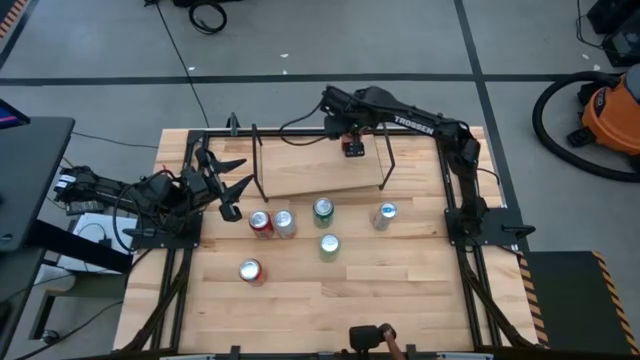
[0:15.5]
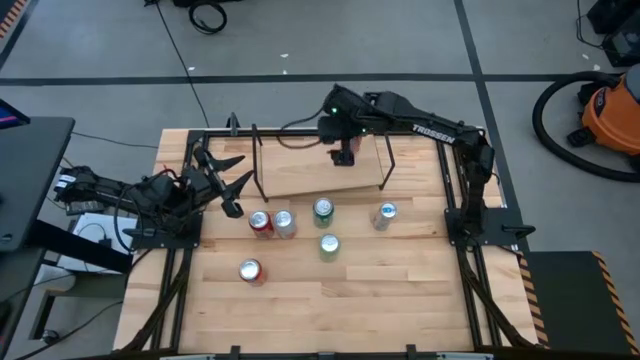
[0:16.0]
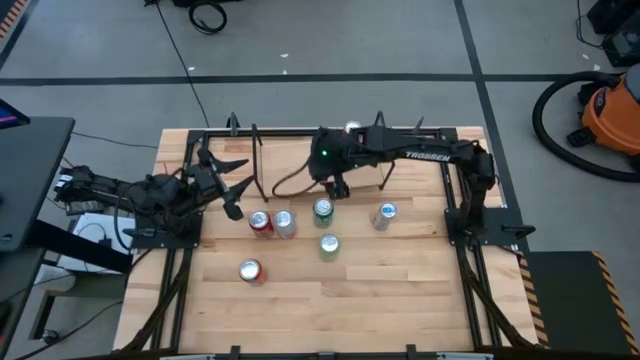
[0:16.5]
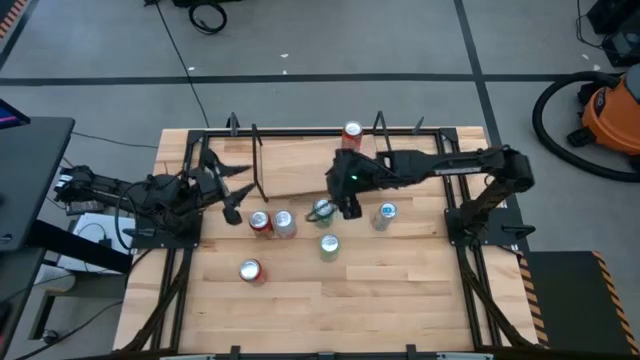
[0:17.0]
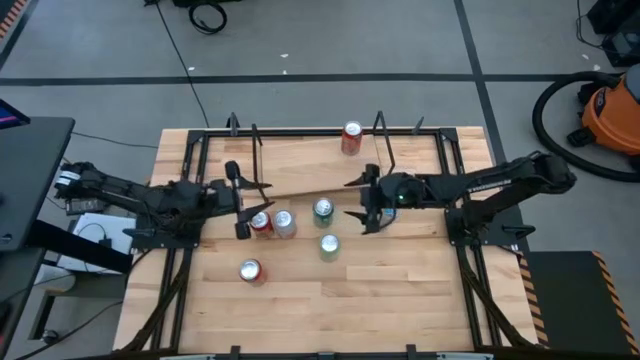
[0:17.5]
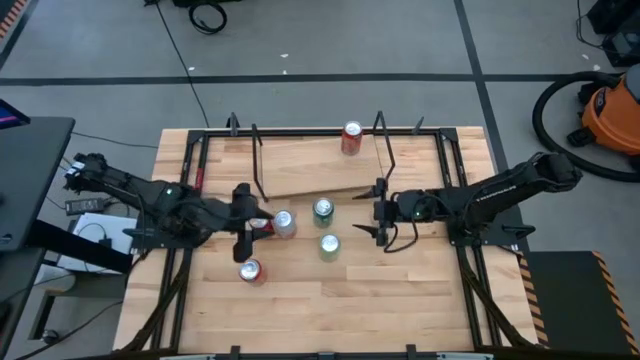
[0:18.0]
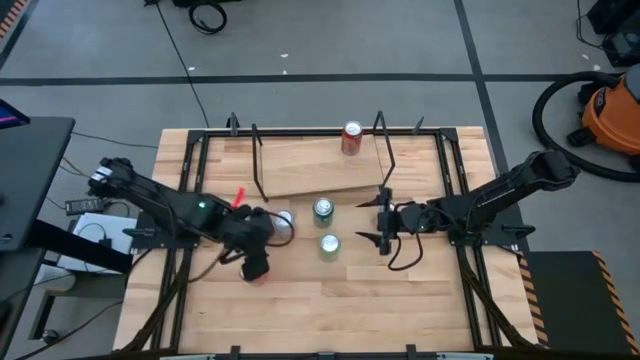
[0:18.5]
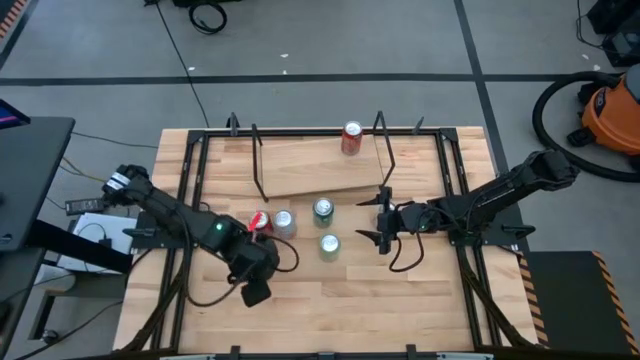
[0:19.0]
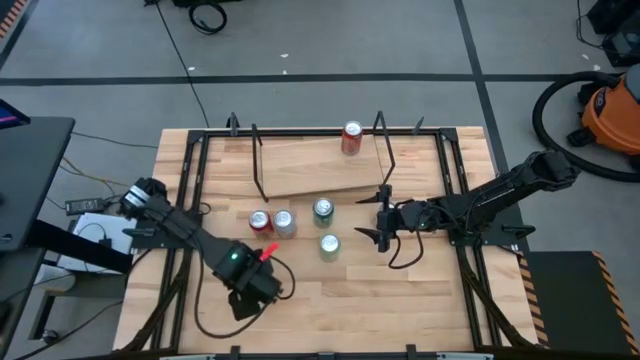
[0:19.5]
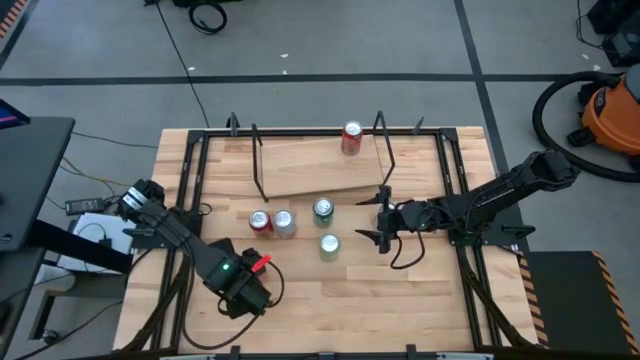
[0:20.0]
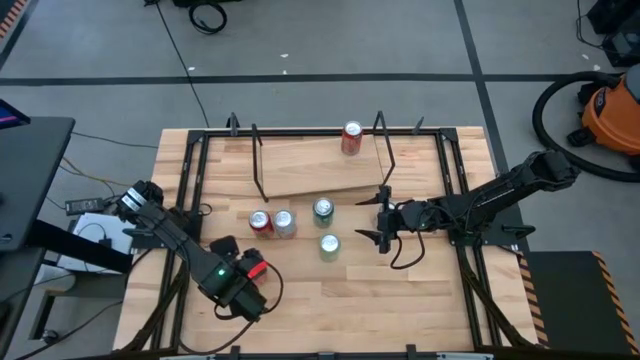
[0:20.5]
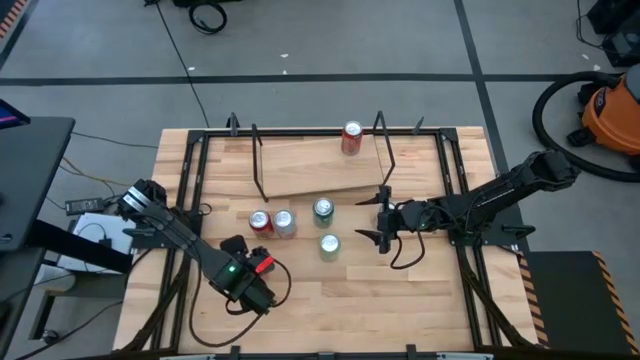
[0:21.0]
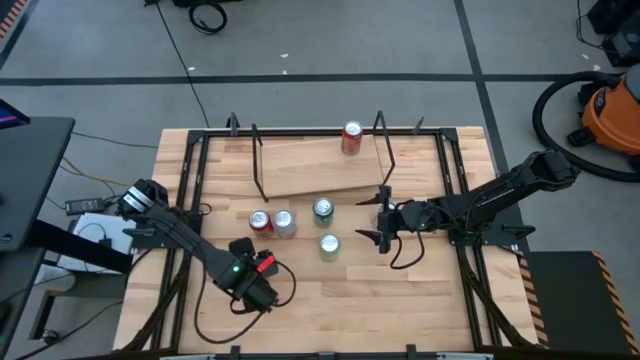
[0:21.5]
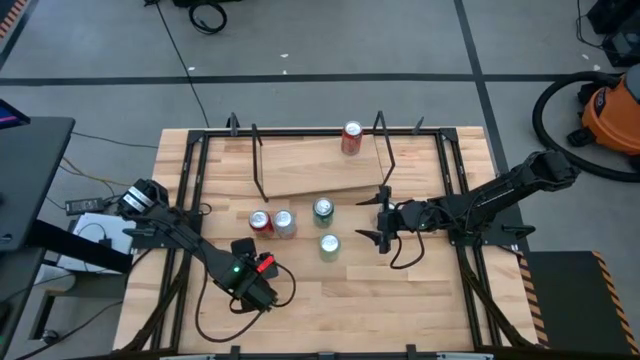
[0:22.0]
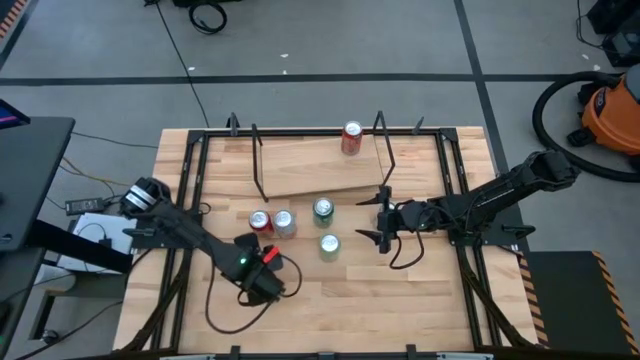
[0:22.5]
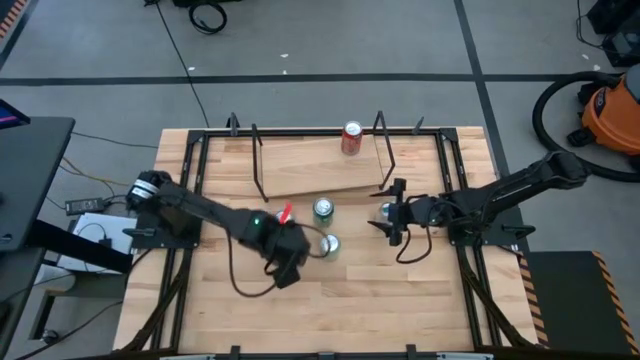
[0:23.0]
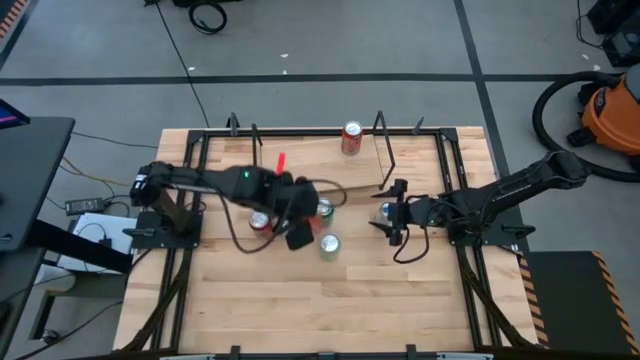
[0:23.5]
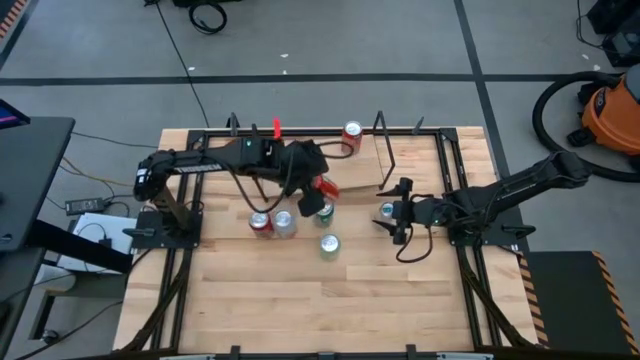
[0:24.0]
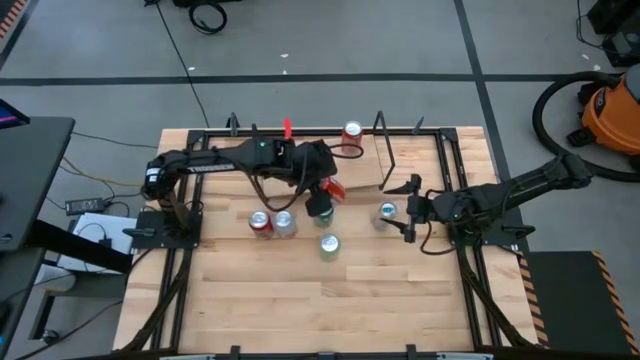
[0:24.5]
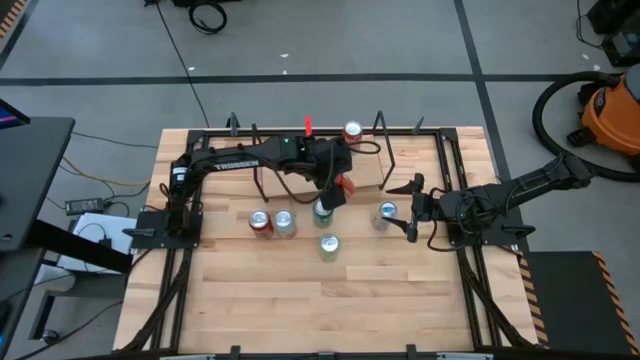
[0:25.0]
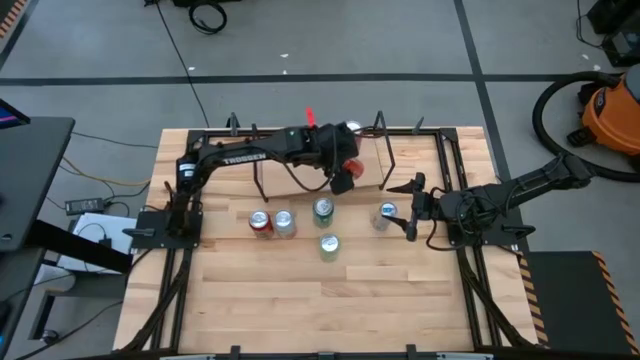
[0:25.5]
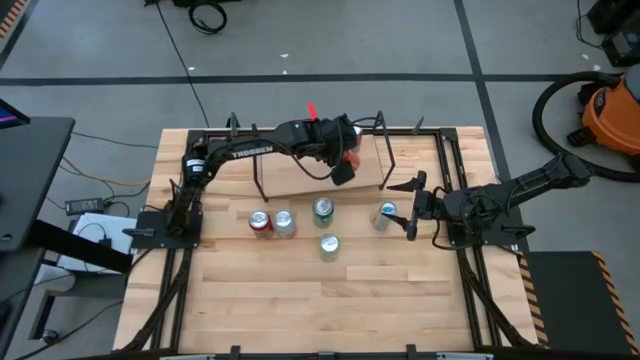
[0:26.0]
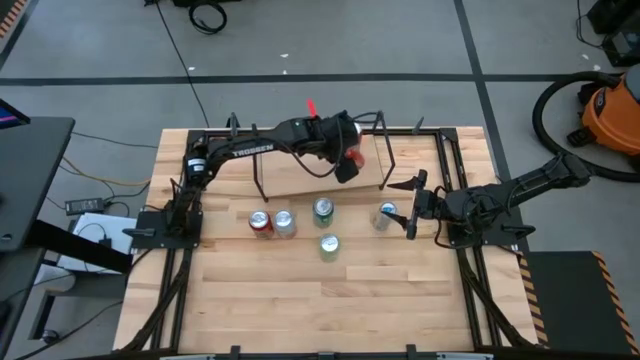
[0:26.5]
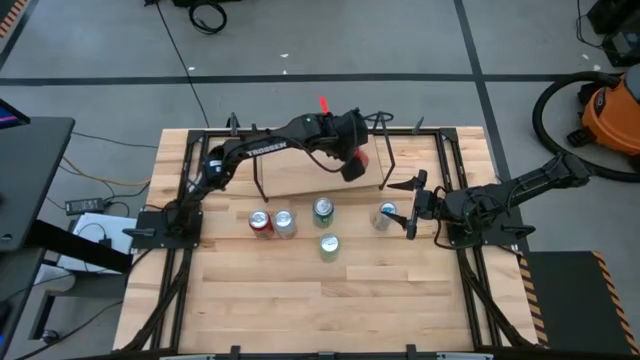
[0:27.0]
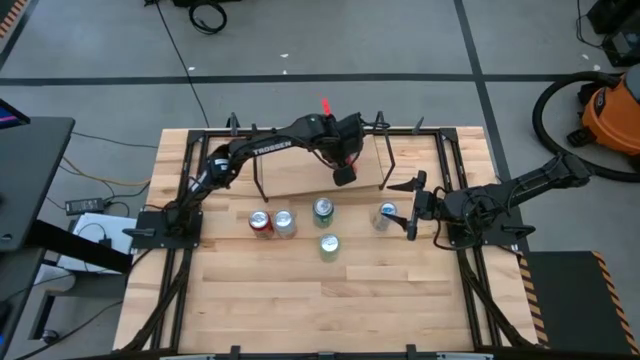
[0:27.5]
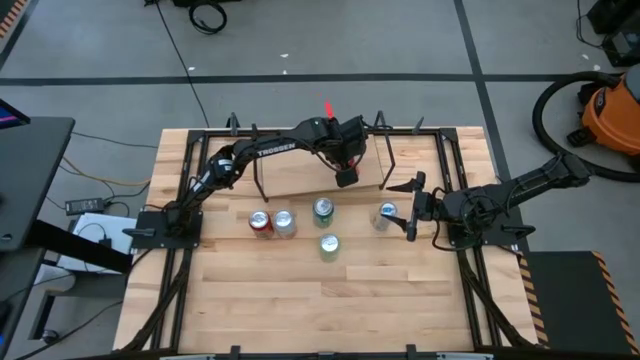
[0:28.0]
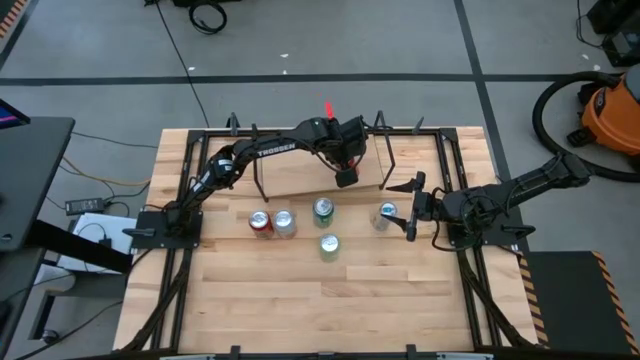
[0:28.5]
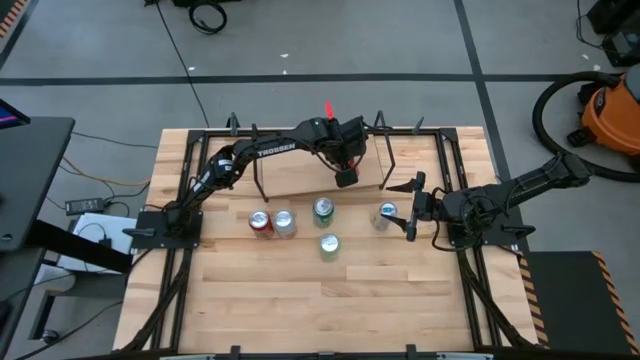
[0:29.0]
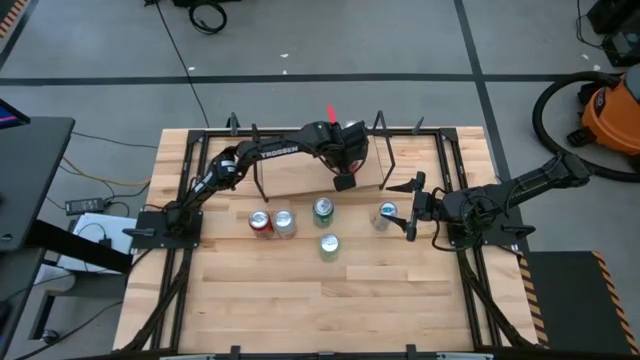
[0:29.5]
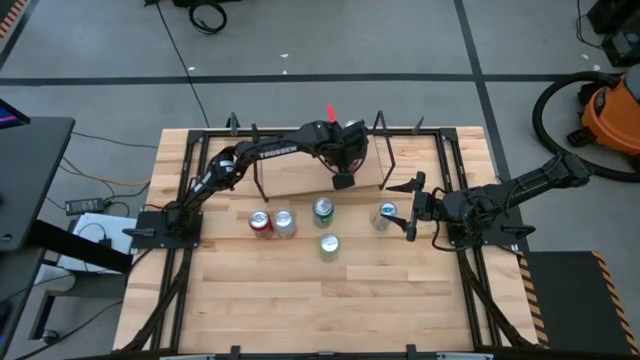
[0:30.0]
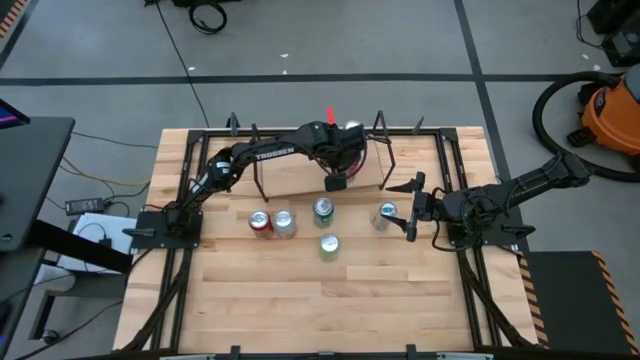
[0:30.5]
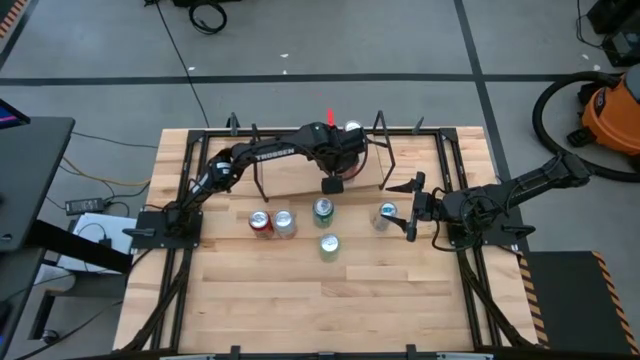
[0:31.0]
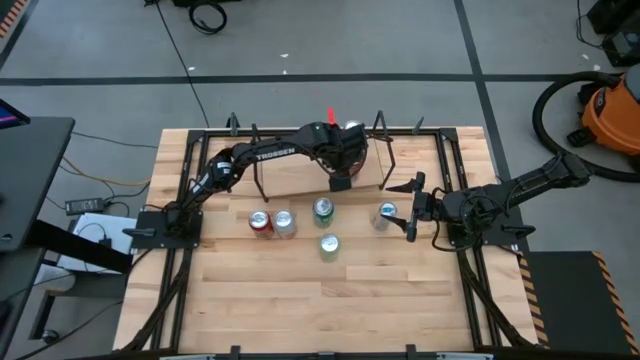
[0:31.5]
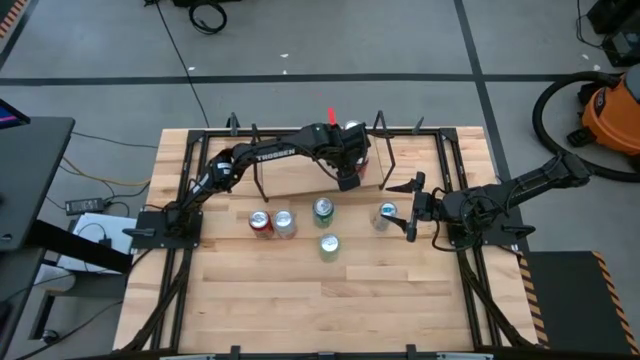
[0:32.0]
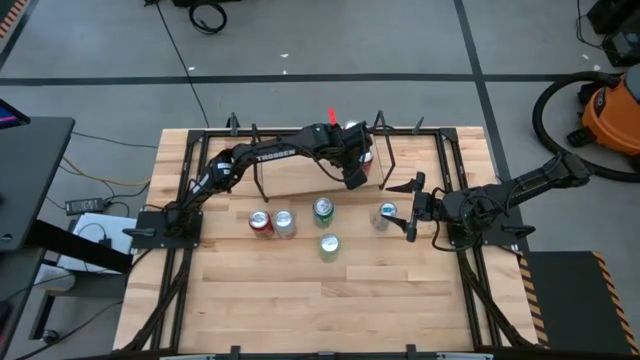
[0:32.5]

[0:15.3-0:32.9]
Task: Place canned beverage on shelf
Put the red soda can on the shelf aligned with the red soda can

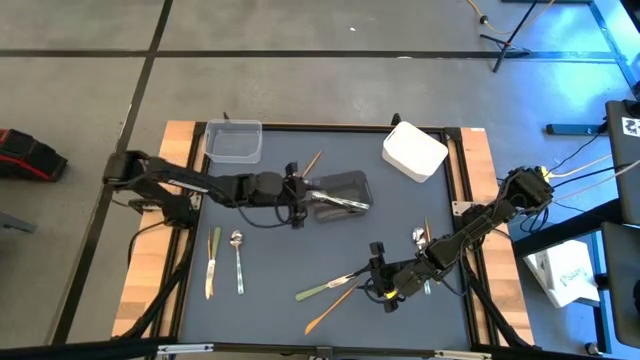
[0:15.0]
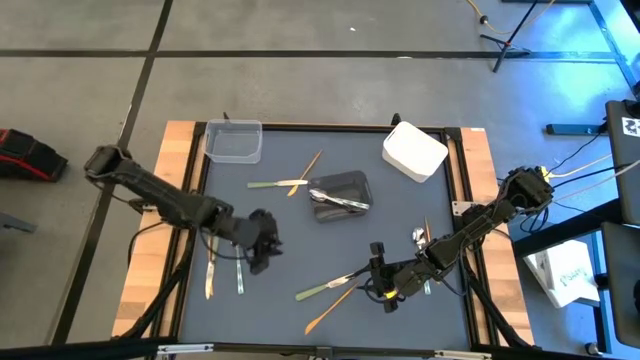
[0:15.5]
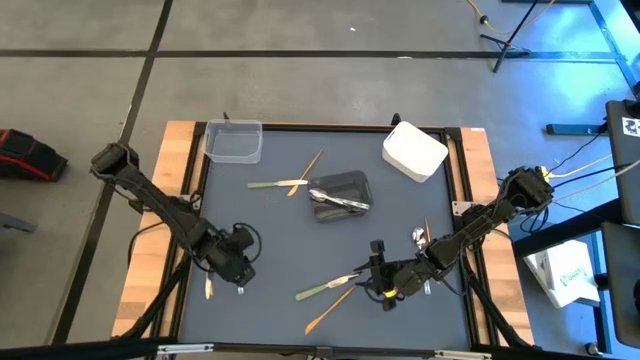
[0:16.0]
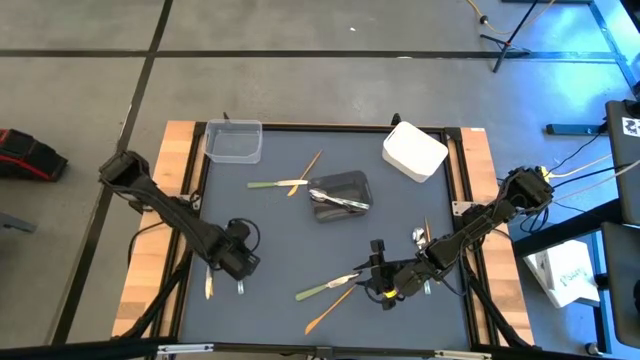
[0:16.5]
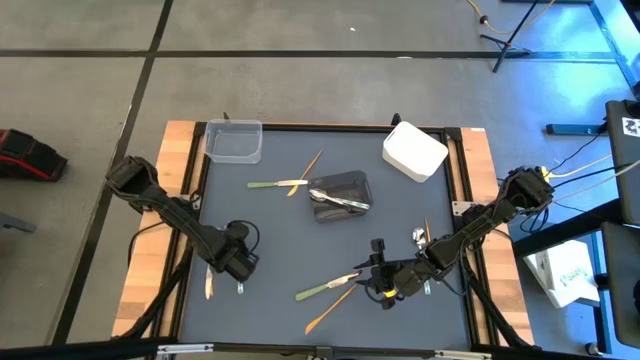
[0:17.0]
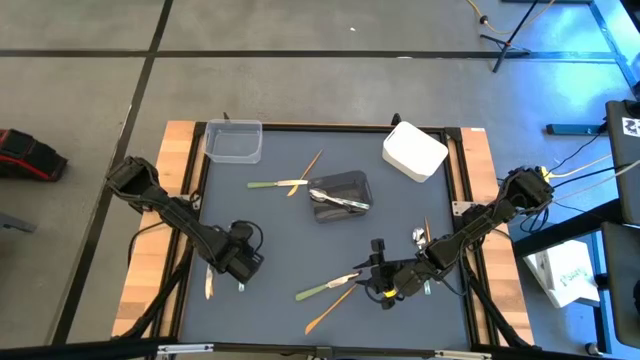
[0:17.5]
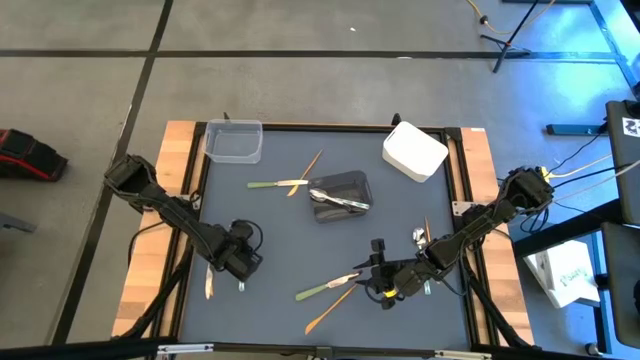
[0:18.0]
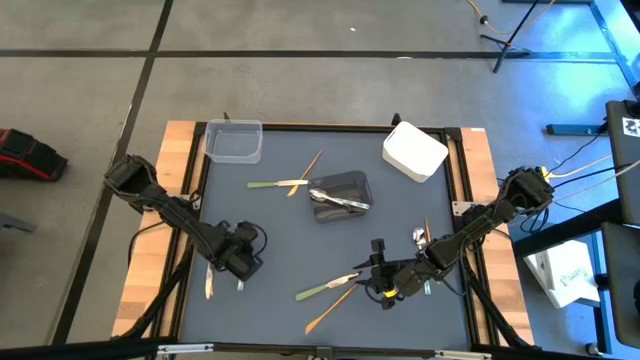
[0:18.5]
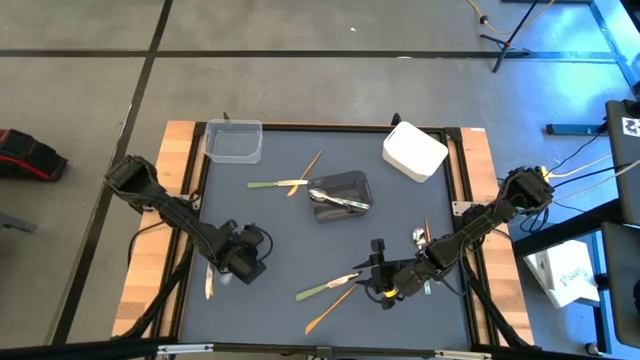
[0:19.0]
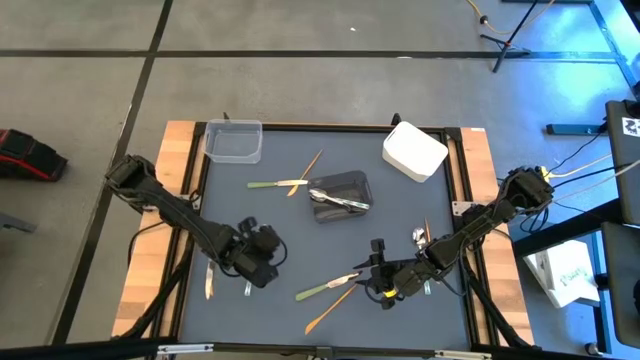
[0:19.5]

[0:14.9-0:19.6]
Task: Sort silverware by color (type)
Put the left blue spoon into the black bin
